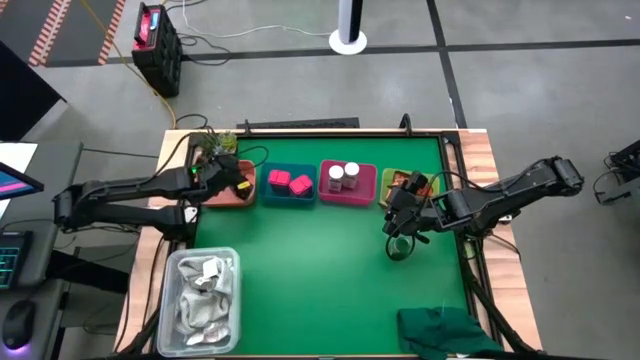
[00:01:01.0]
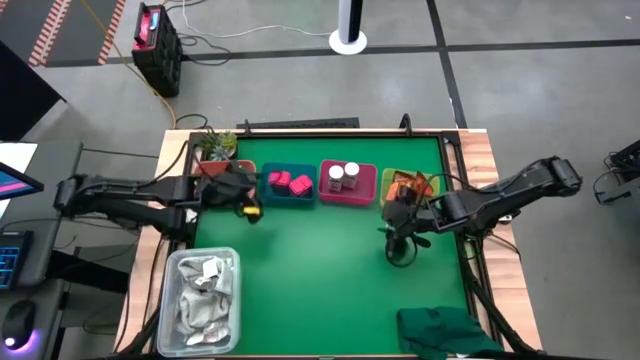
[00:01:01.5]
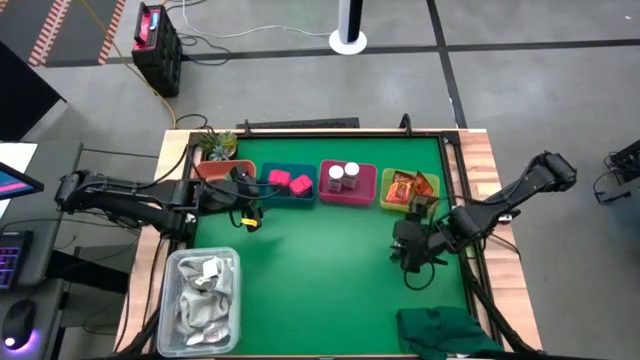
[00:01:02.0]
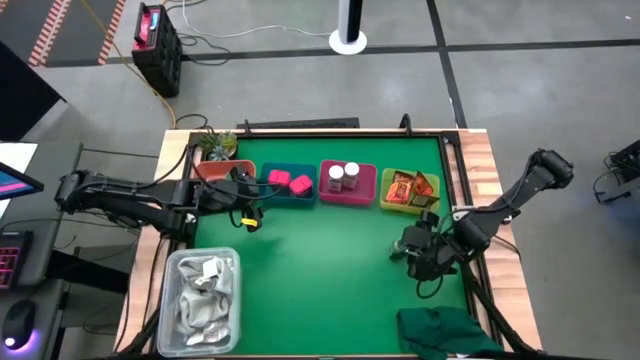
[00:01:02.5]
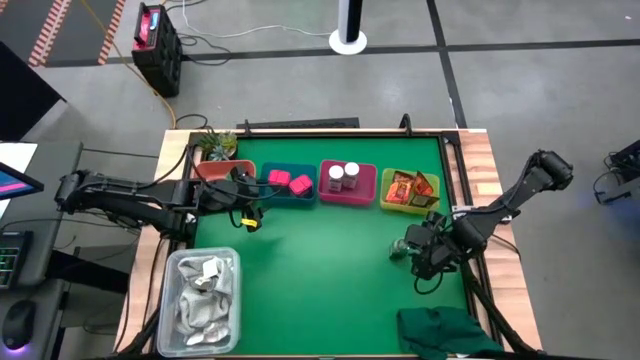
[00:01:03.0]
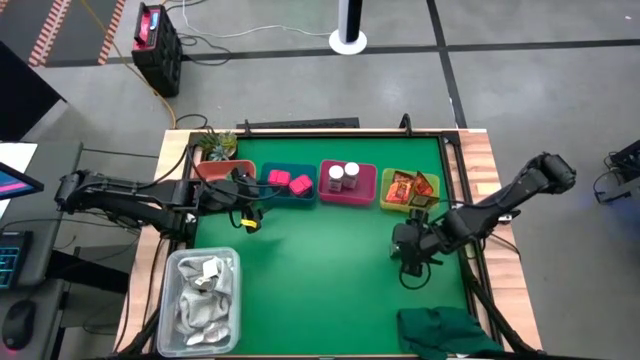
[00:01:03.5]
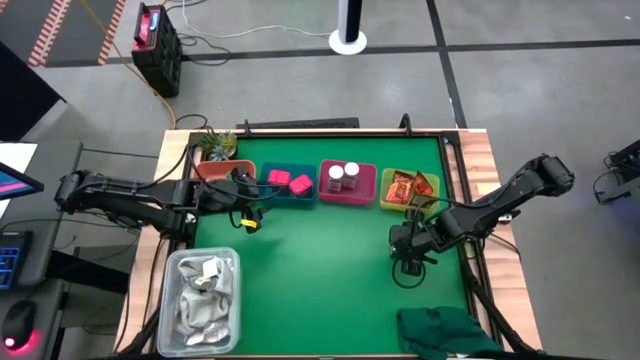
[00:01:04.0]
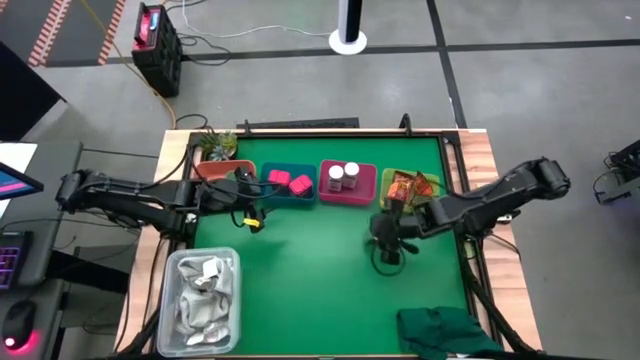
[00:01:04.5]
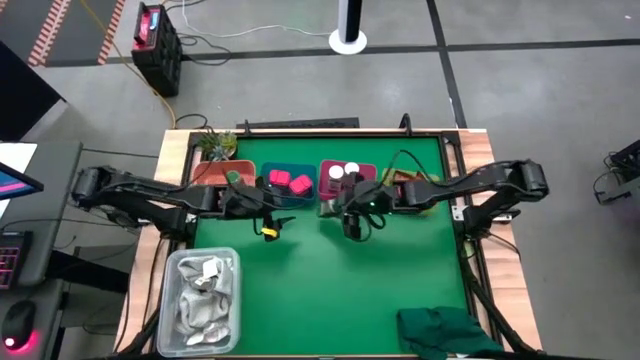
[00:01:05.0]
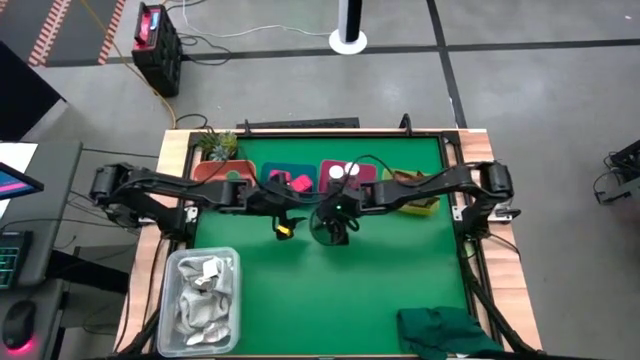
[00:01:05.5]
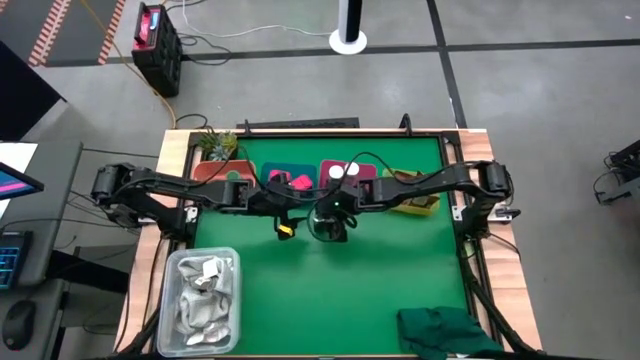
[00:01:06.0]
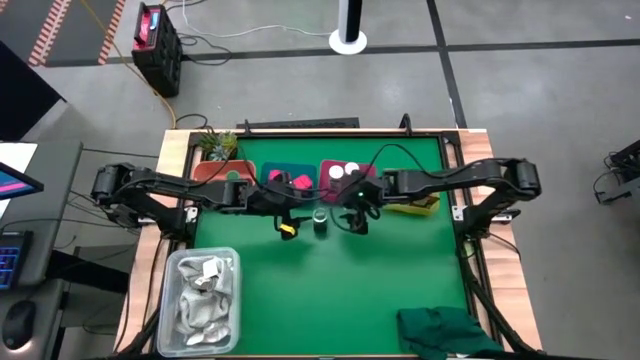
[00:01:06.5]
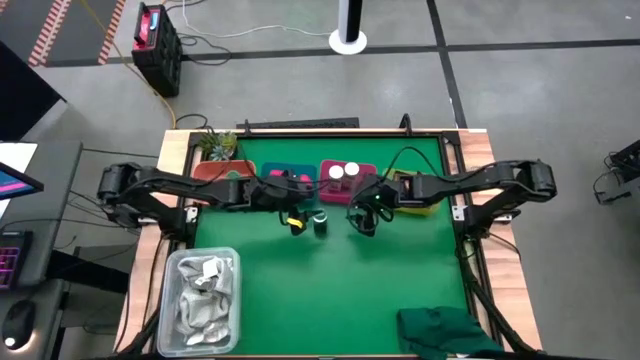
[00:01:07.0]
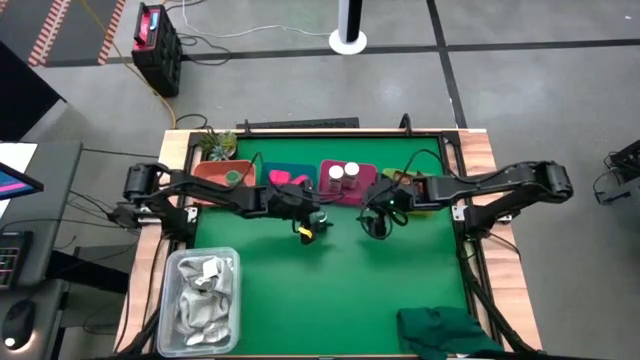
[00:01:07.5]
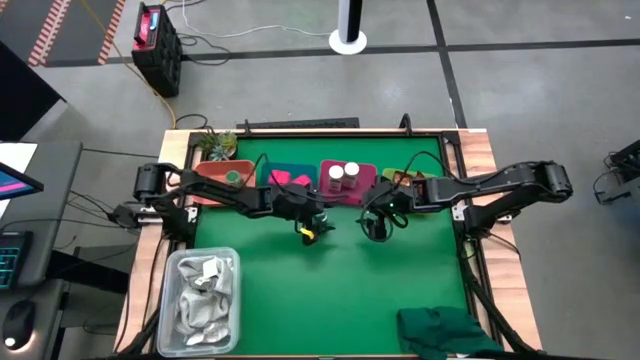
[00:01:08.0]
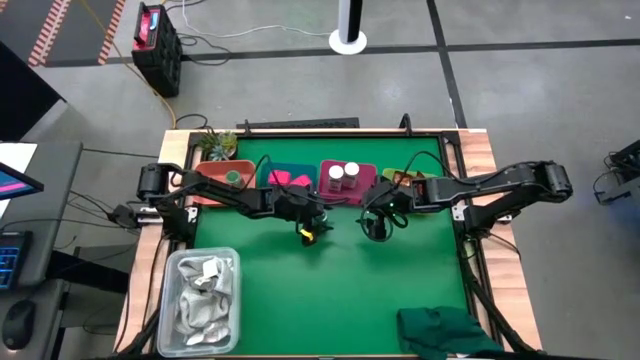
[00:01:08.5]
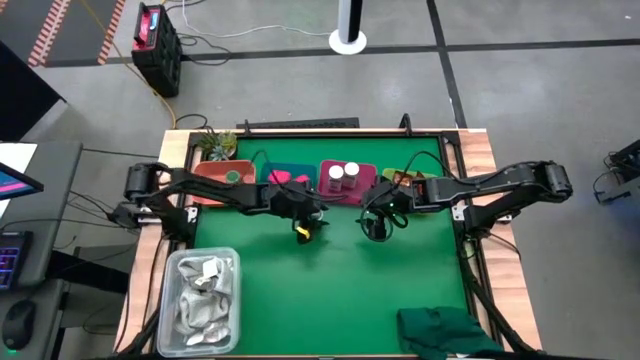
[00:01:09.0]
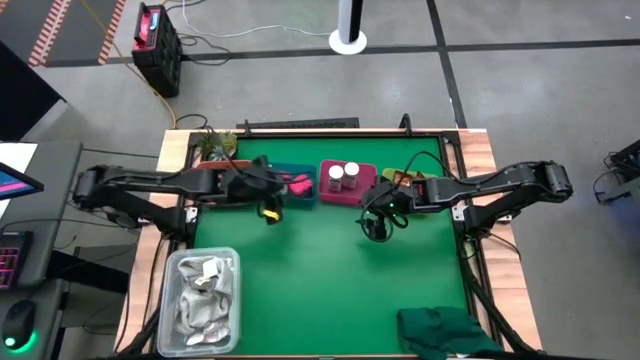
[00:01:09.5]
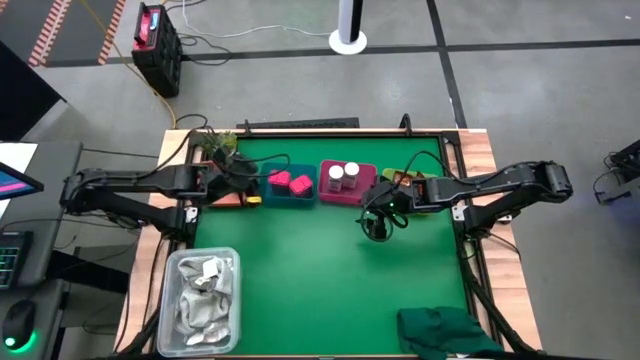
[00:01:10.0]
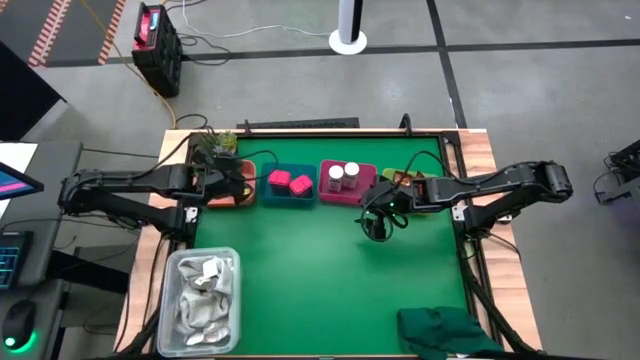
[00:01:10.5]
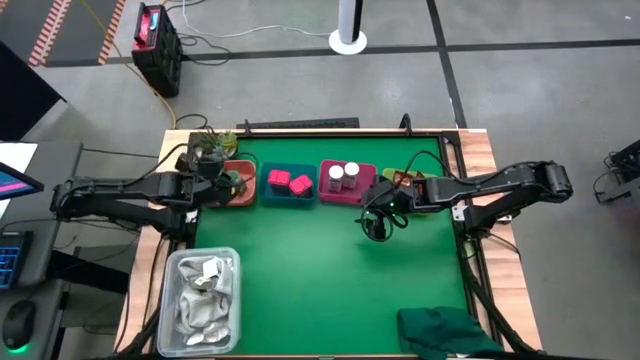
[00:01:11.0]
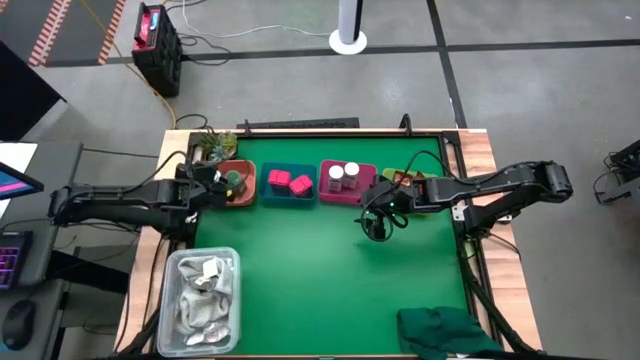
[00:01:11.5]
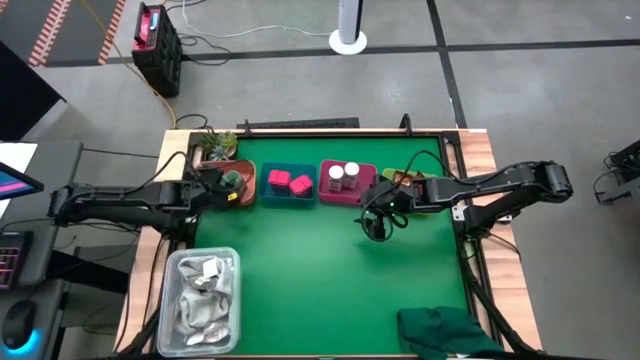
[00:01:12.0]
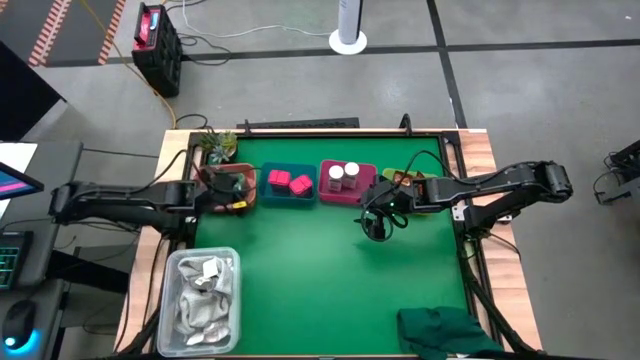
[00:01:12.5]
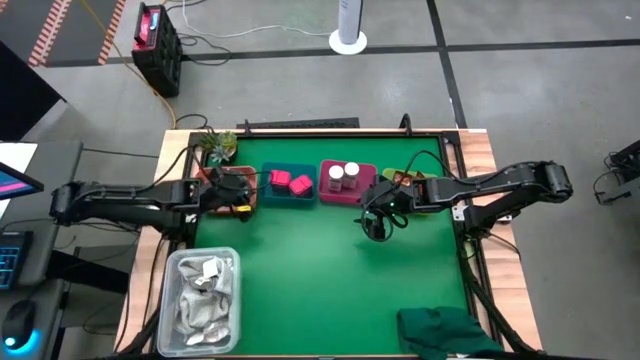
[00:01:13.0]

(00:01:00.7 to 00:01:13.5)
Task: Sort spices by type
Put the green seasoning bottle into the orange bin

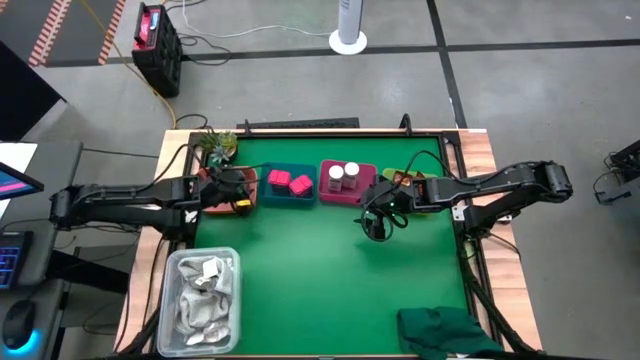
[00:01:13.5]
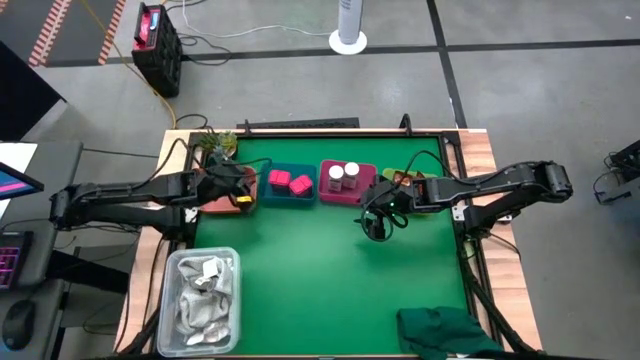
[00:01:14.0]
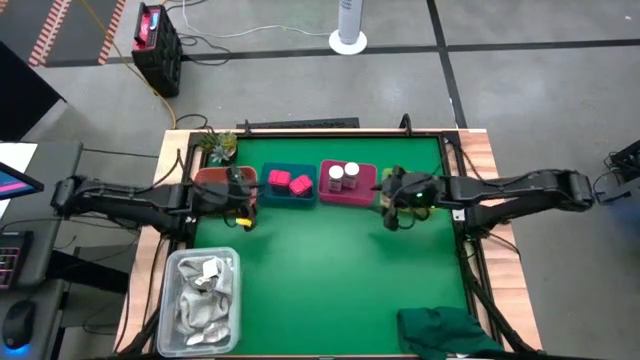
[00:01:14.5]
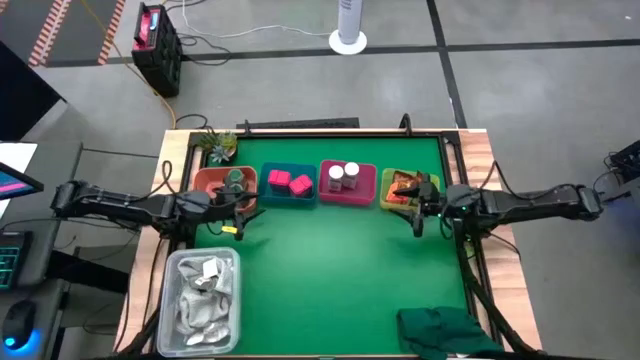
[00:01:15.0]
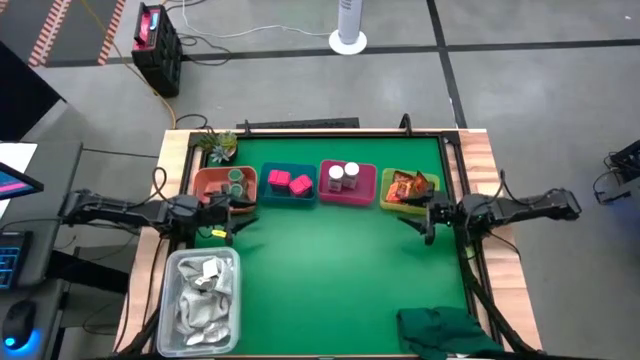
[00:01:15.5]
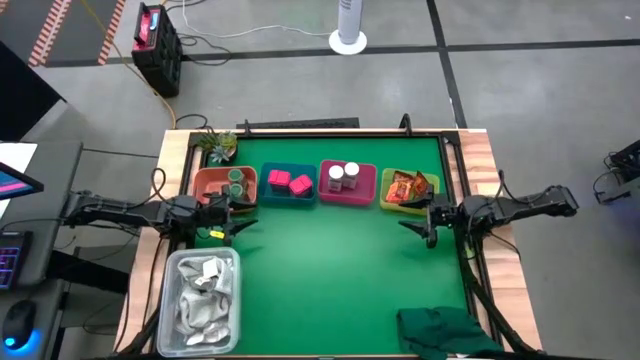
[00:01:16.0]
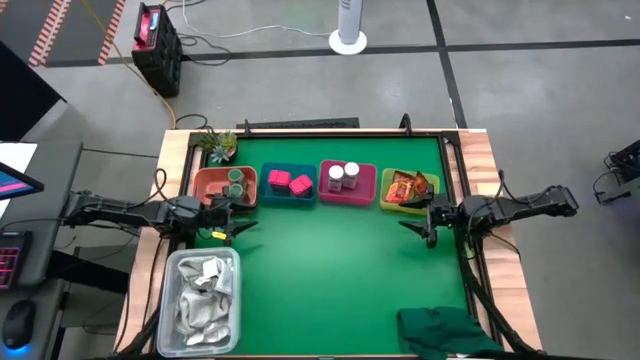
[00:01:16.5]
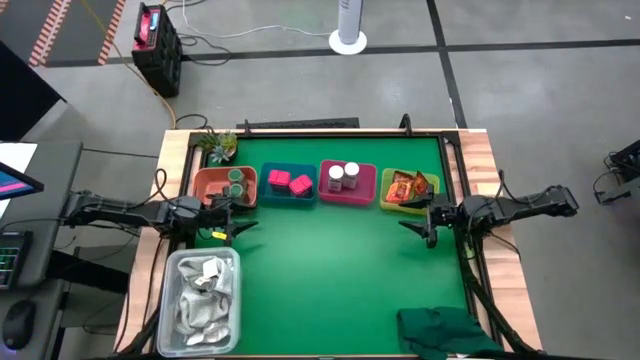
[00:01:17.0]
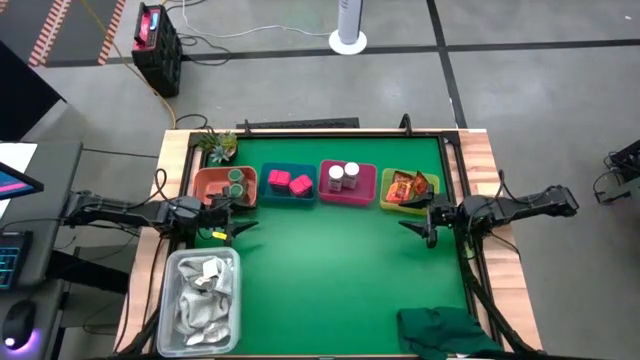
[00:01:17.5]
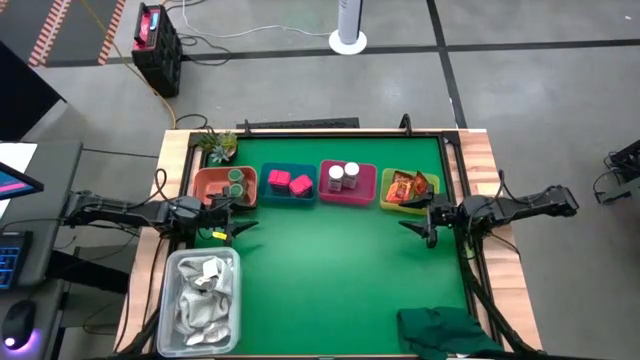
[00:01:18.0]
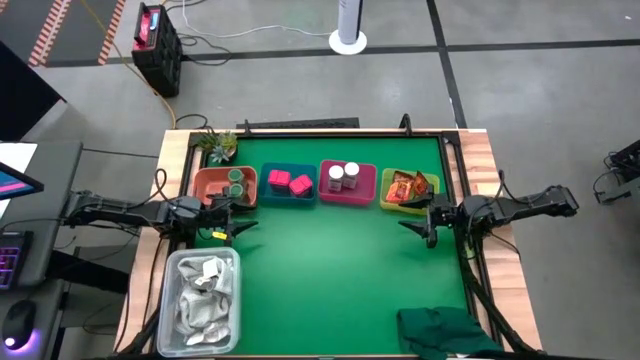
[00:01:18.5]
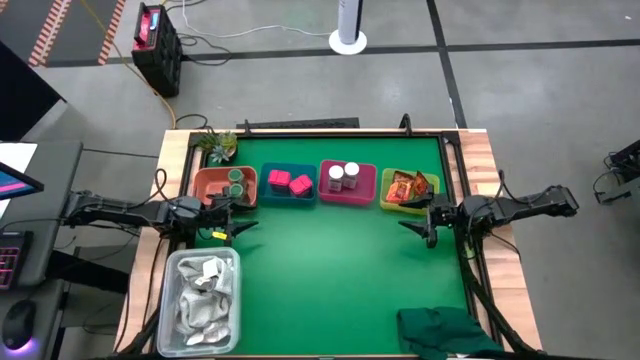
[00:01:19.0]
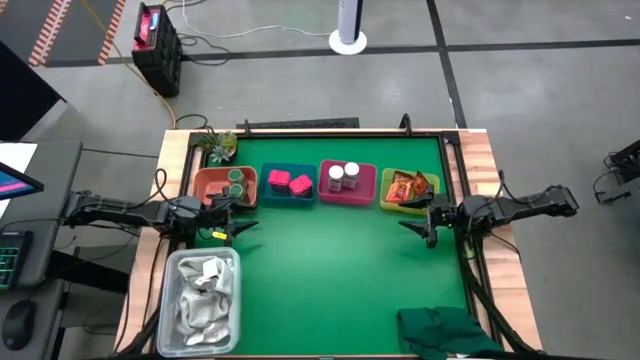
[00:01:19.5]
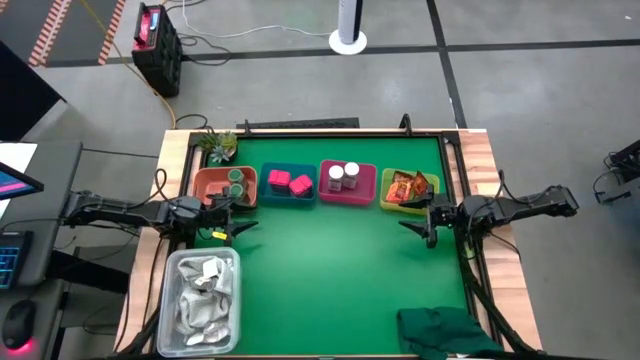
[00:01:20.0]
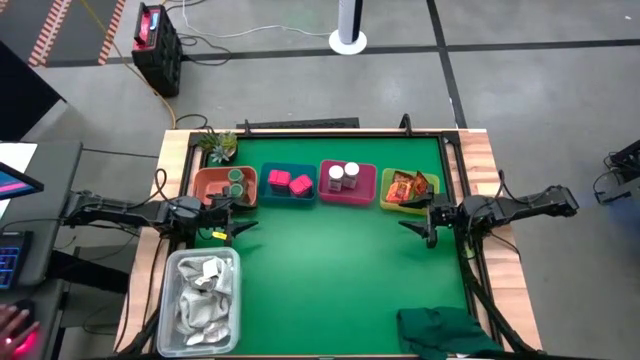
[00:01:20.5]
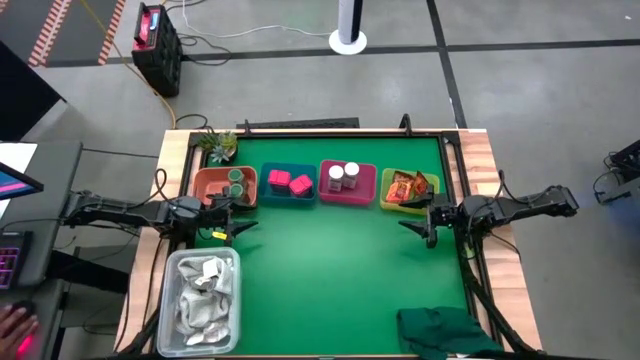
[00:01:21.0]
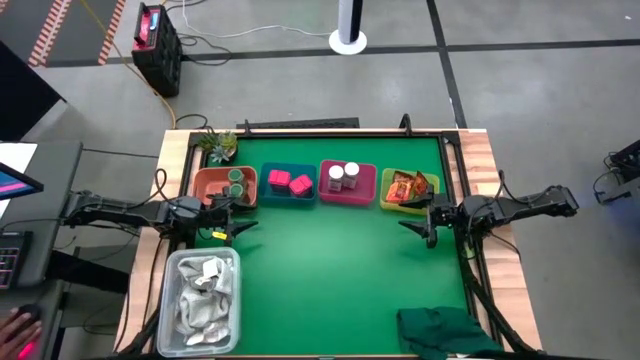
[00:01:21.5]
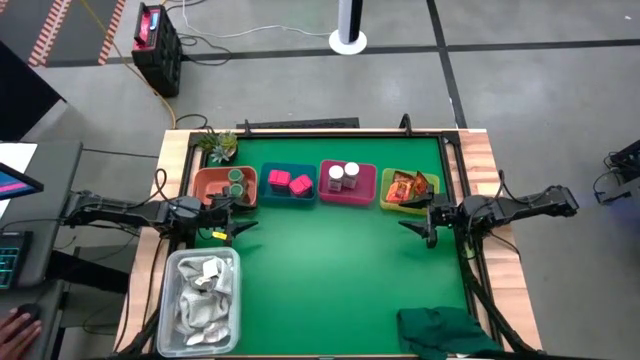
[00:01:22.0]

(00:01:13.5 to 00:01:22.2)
Return to Home Position
